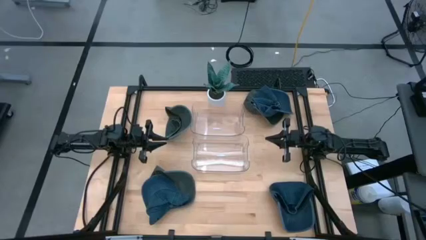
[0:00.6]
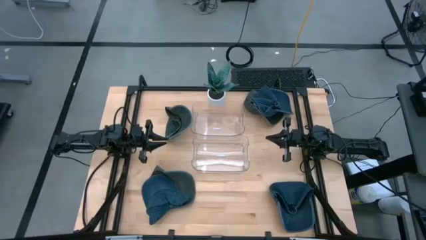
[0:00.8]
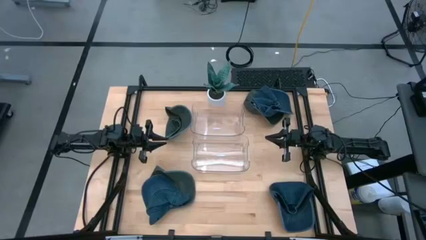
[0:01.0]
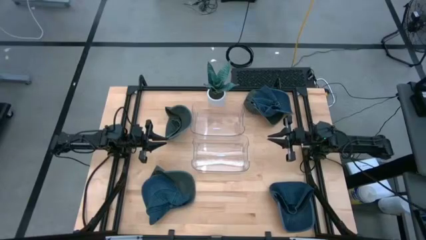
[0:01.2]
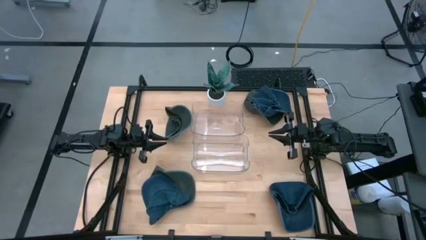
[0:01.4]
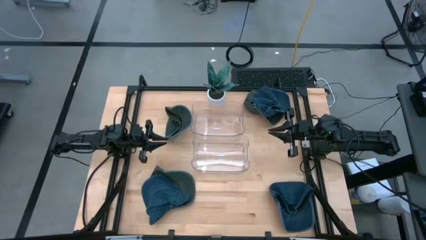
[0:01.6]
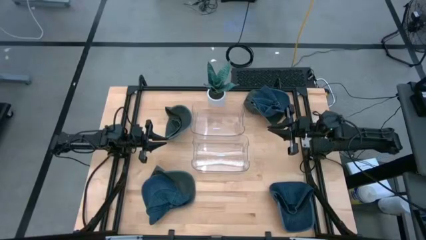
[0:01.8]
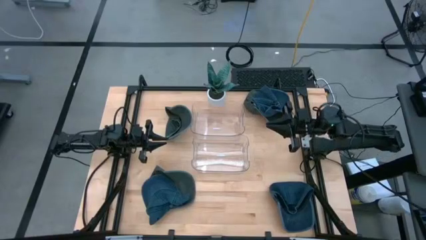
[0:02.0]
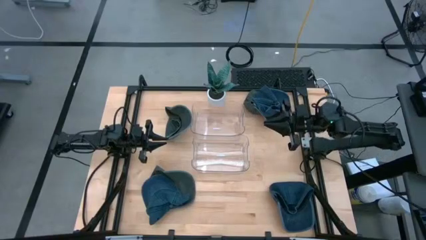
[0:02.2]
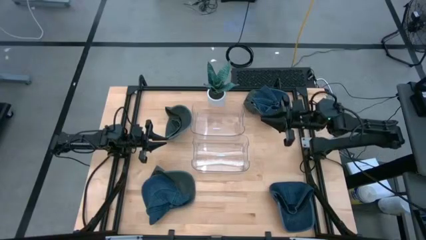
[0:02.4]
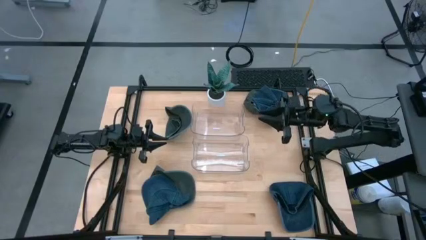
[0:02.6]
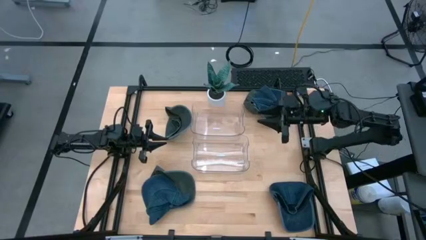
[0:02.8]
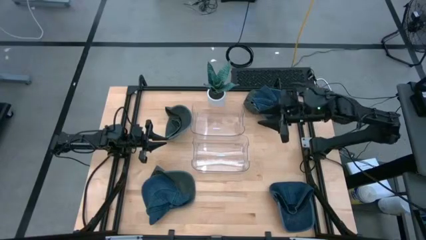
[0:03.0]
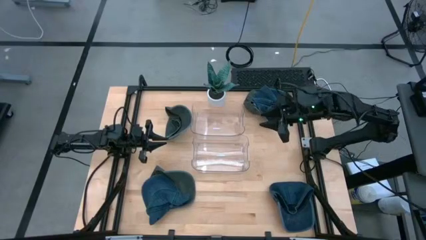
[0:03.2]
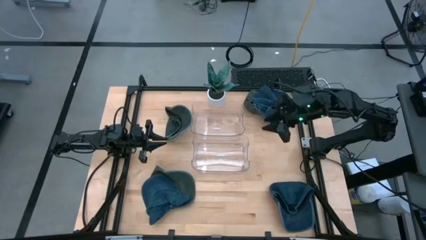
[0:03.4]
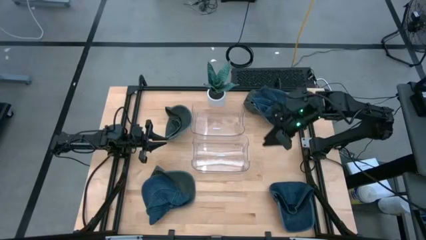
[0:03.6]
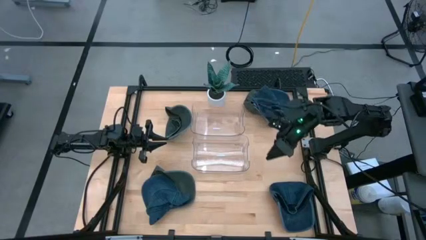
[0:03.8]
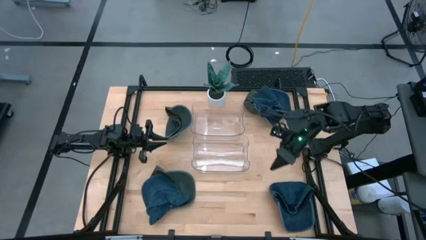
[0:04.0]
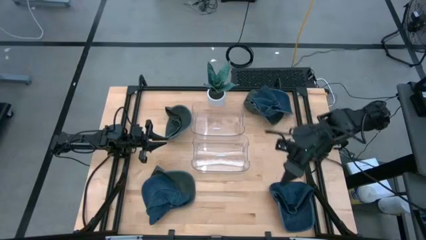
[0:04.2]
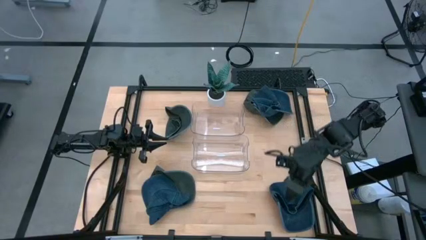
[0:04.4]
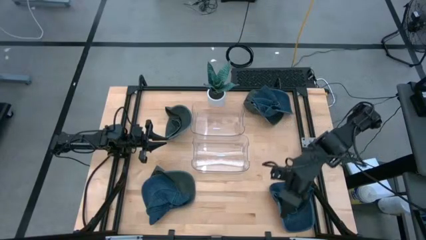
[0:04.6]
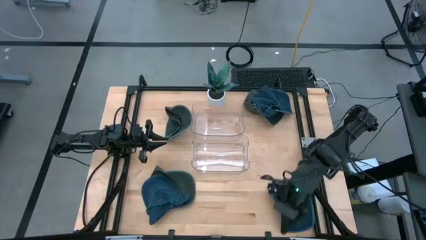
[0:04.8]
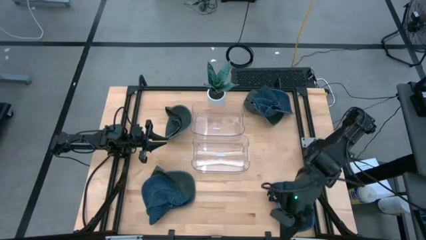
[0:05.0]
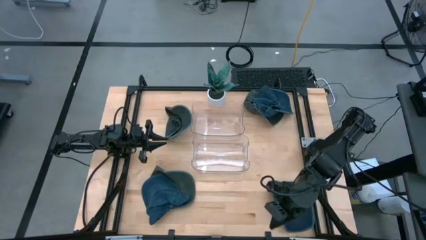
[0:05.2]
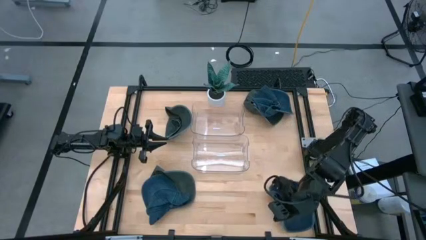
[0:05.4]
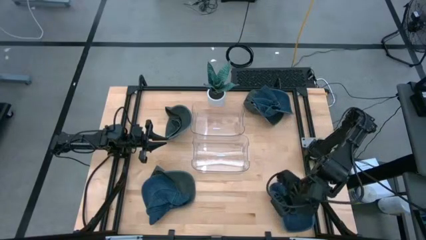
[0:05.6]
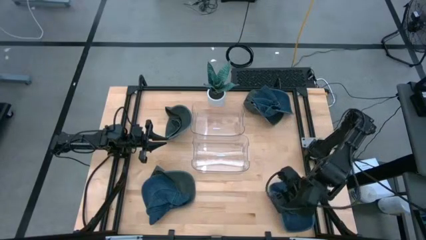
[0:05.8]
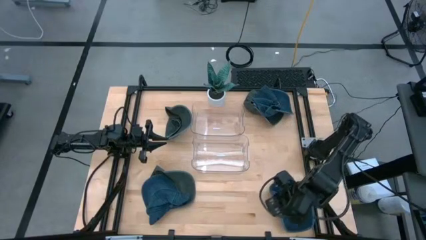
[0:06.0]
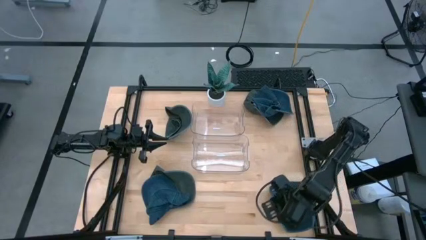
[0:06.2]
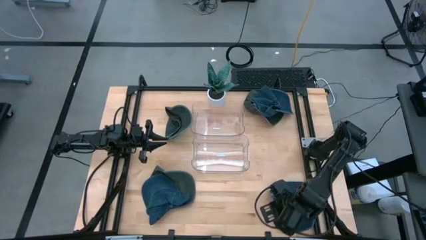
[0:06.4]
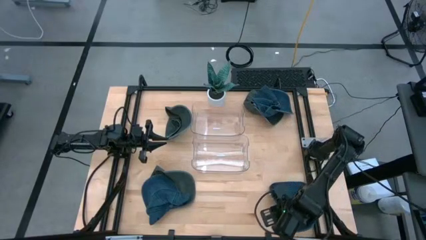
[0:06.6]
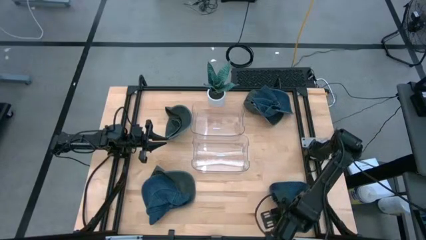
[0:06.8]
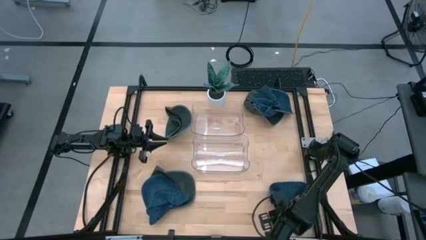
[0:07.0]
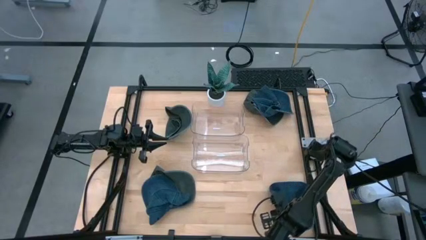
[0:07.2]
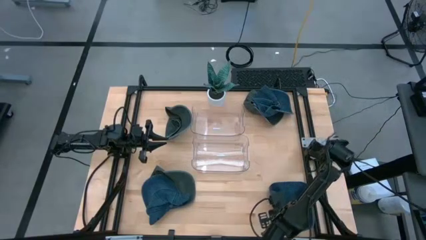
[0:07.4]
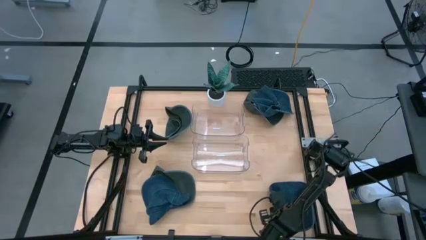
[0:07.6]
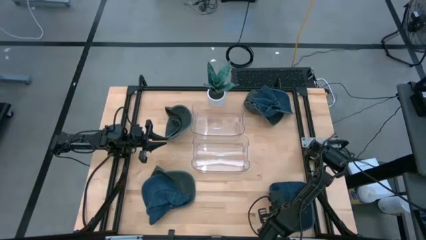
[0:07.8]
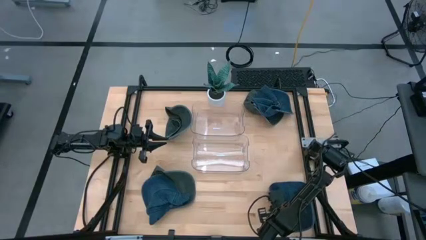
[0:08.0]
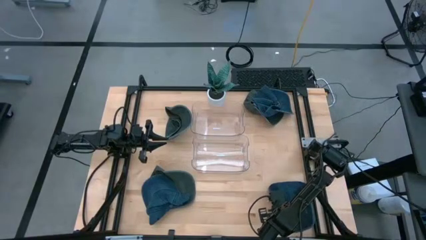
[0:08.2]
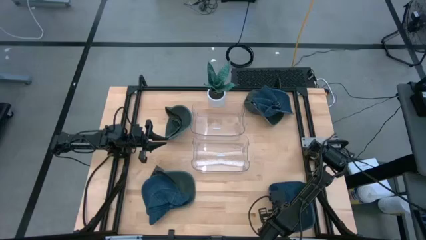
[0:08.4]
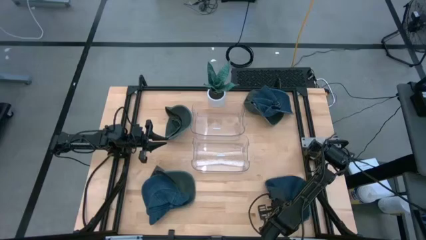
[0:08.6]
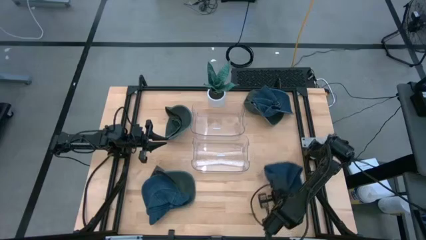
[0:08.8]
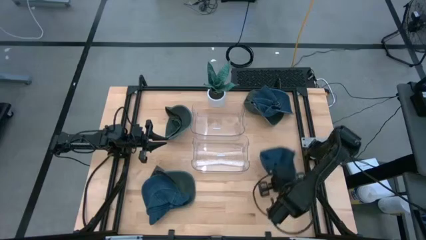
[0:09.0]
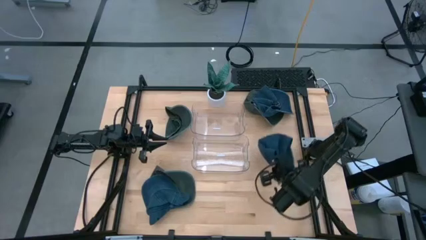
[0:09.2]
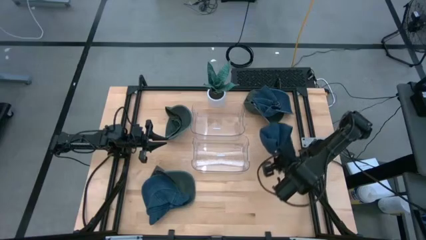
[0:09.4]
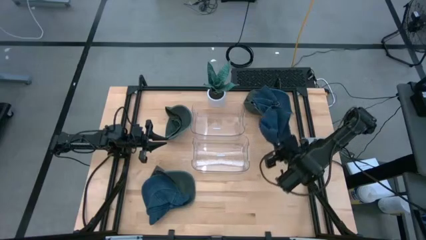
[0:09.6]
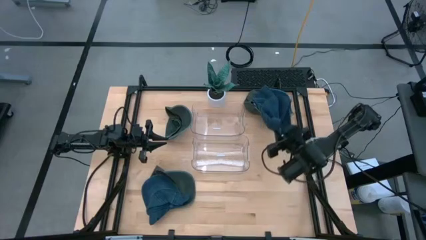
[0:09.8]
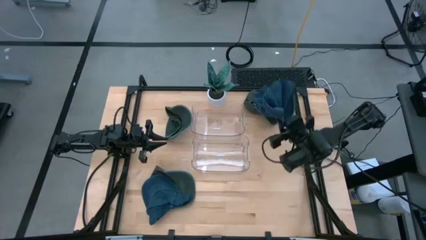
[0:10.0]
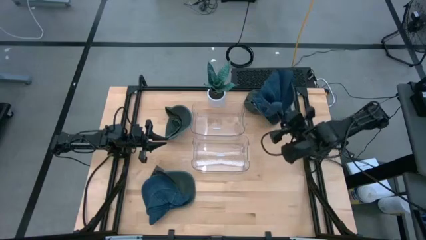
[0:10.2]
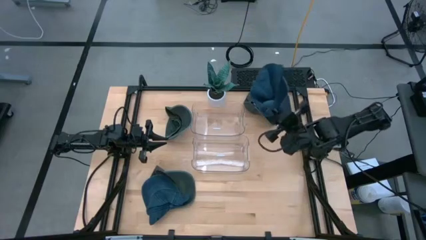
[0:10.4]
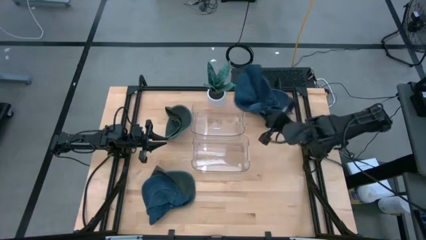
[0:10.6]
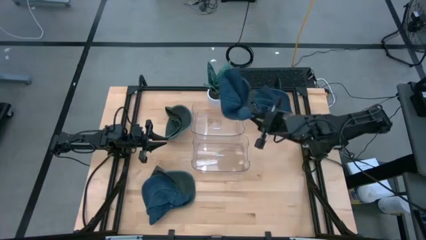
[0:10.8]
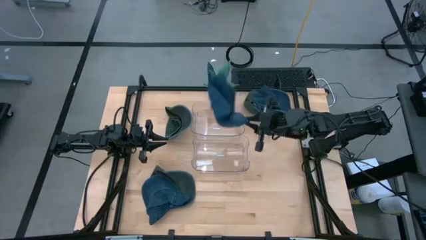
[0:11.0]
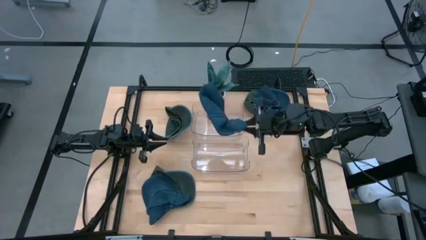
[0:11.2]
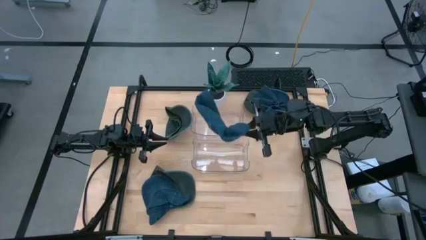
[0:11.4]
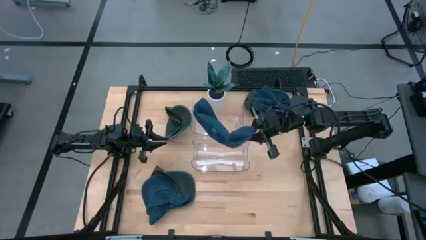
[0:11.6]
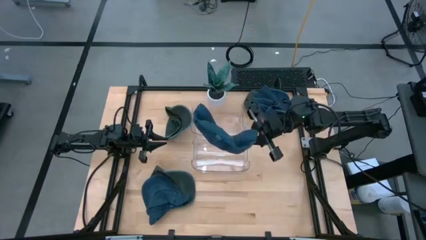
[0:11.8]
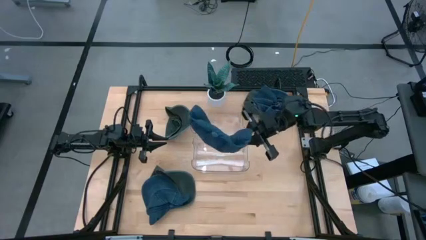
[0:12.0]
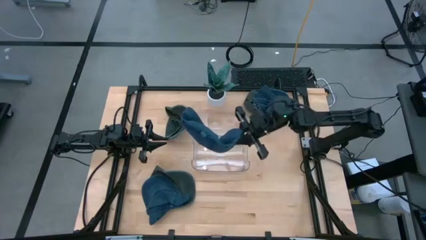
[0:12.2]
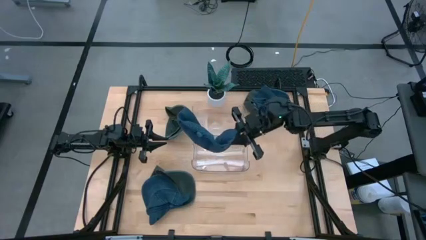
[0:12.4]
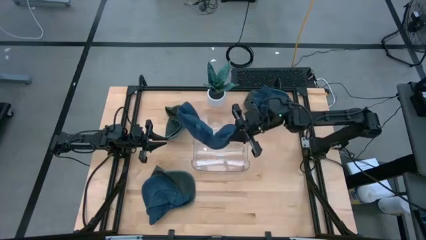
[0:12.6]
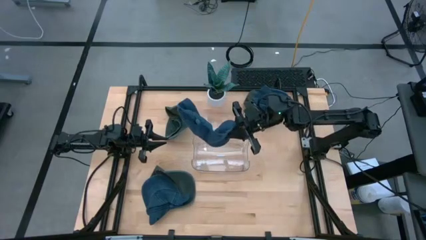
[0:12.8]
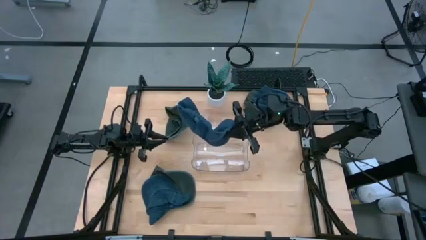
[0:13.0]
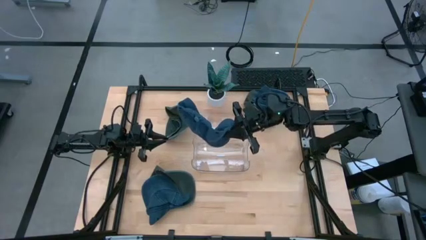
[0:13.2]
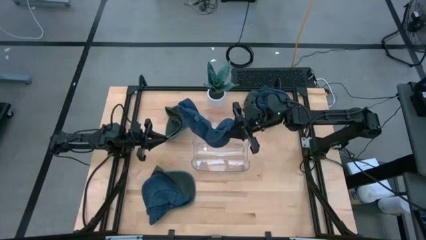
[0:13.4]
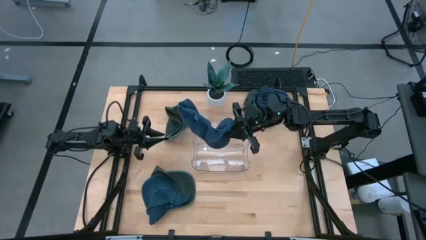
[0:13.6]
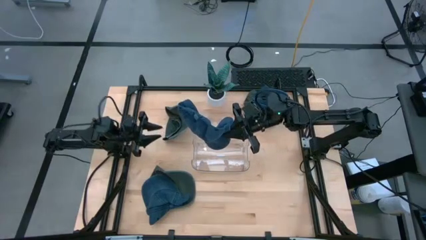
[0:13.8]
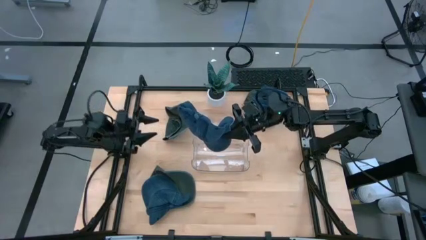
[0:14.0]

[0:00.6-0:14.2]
Task: Pick & Place hat
Put the bottom right blue cap into the top transparent bin
